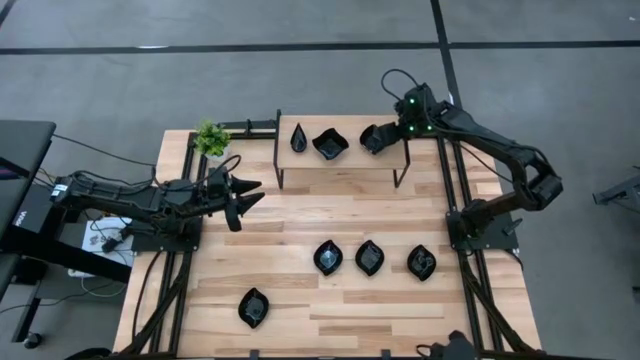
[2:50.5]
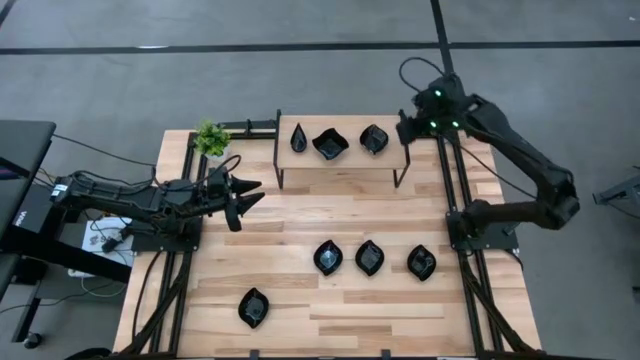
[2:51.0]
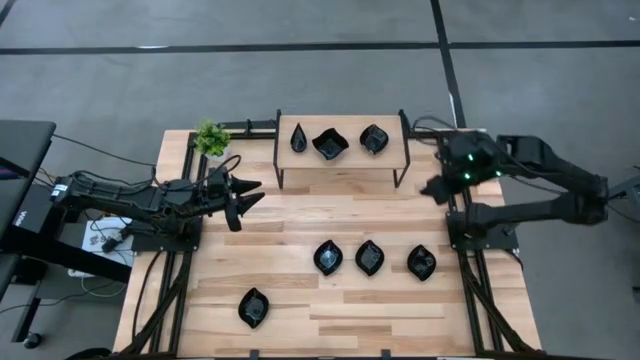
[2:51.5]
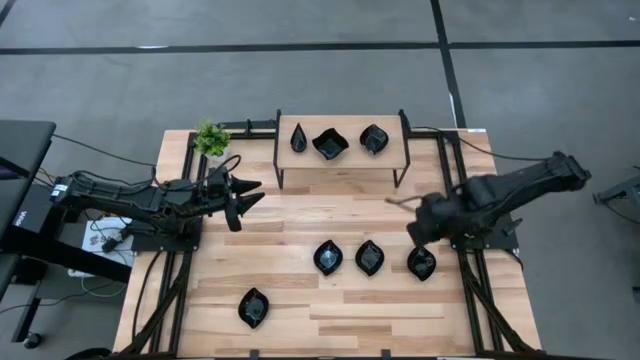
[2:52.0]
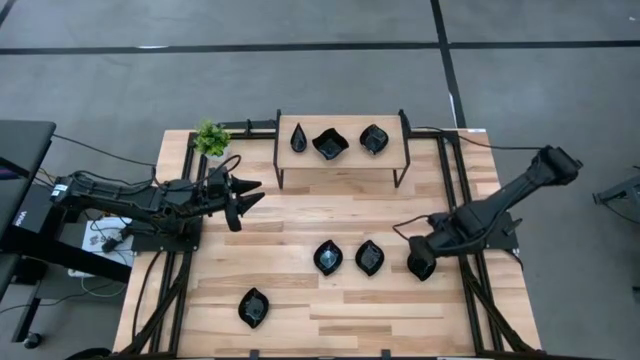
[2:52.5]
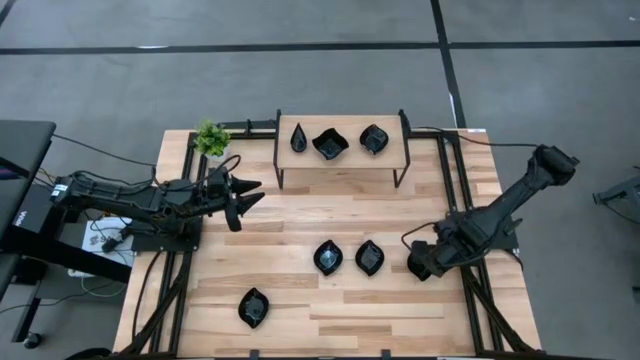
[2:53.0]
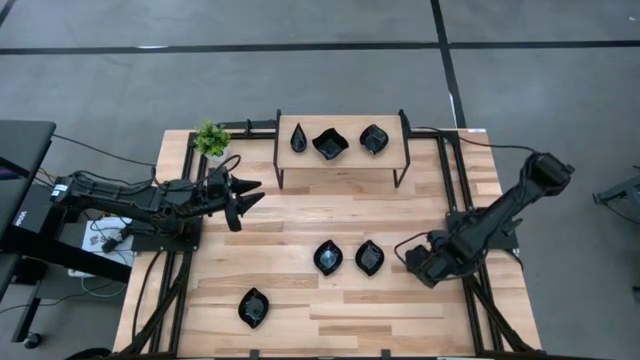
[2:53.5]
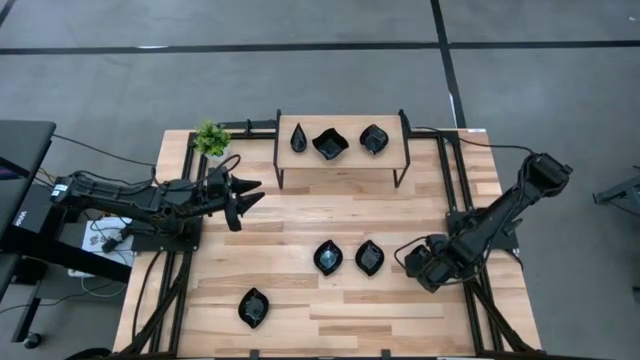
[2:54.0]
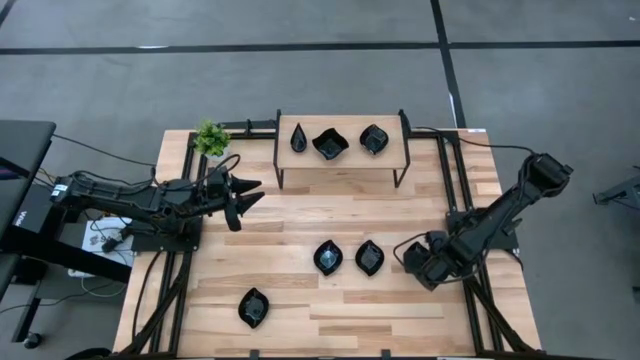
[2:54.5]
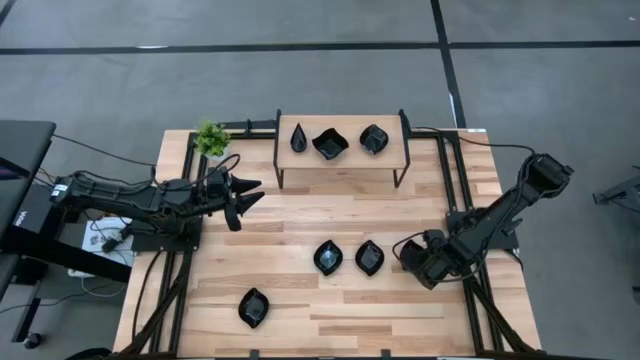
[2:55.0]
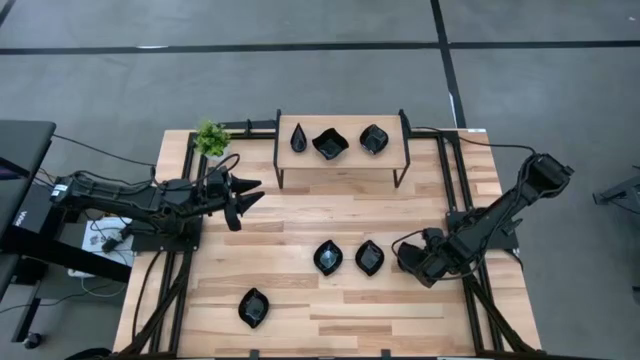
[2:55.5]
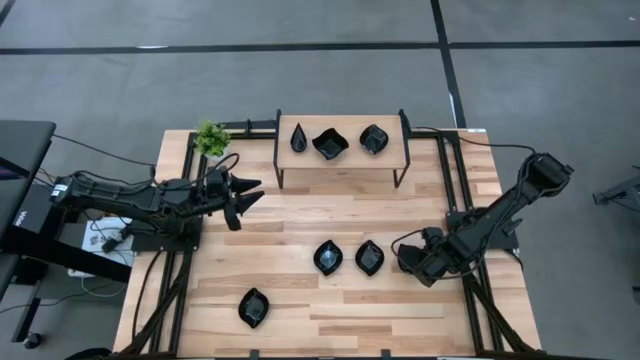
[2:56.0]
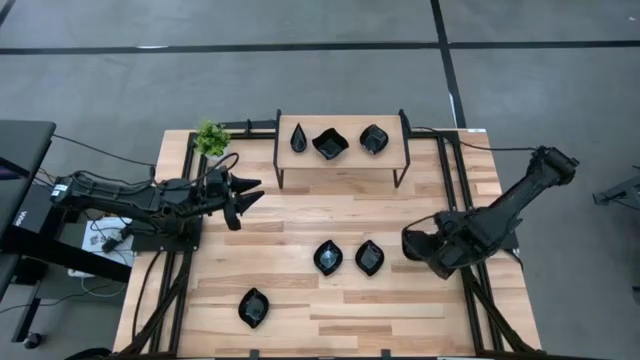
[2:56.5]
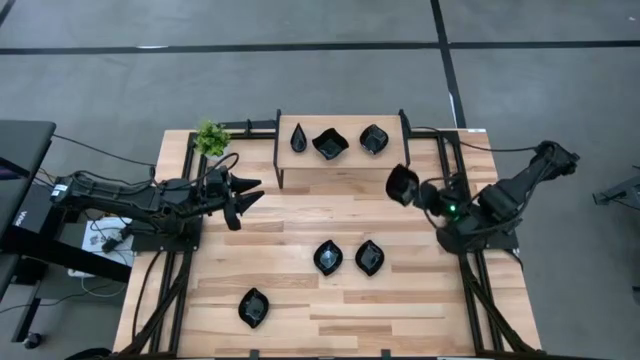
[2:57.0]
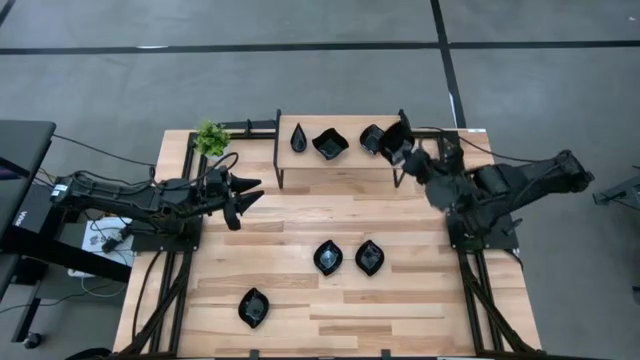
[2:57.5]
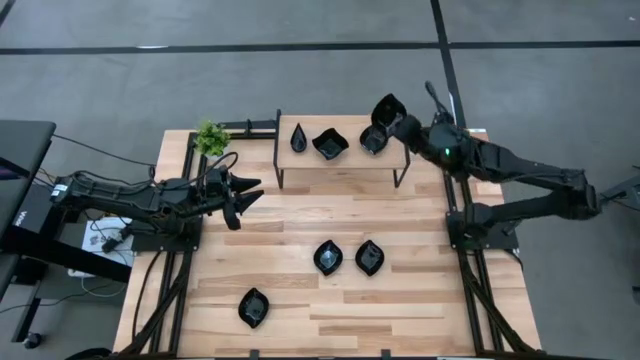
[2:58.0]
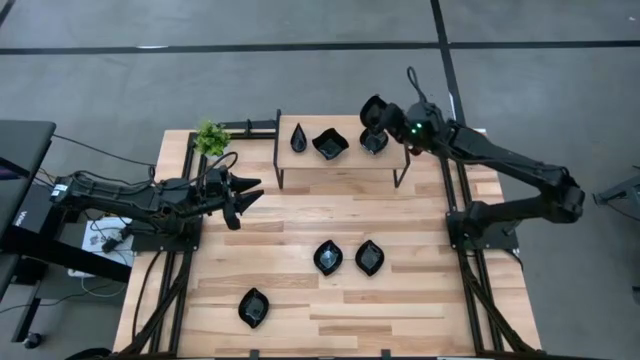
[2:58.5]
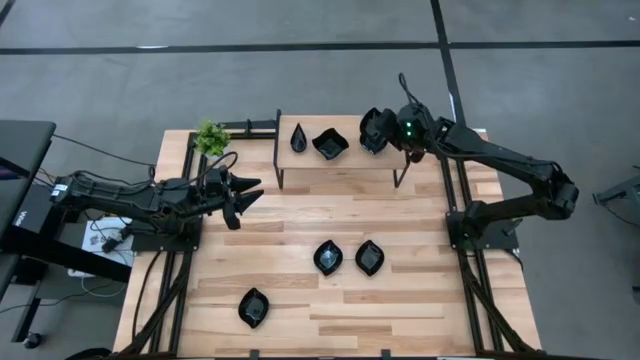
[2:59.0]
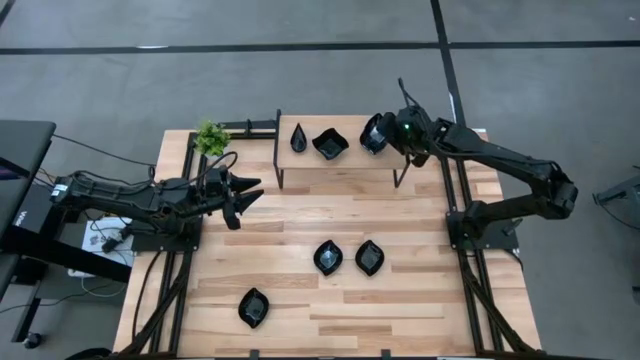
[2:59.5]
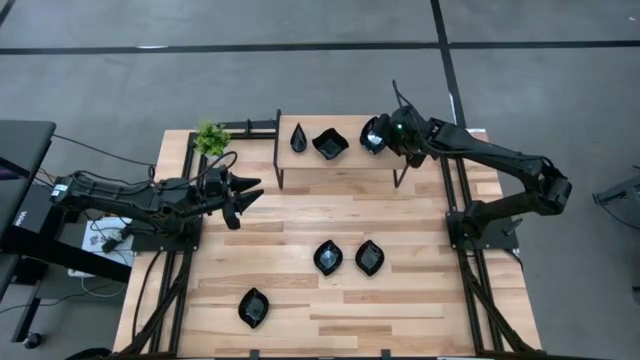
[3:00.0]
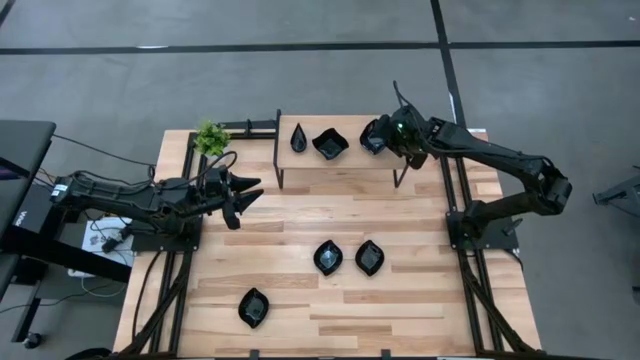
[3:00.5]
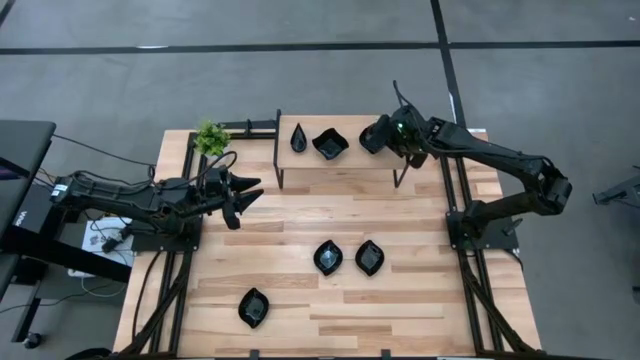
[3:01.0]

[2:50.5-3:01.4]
Task: Pick & Place Mini shaped plates
Stack the black leaf shaped plate on top of the black leaf shaped plate on the shelf

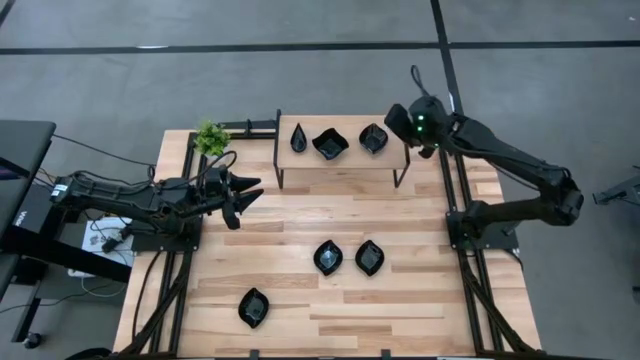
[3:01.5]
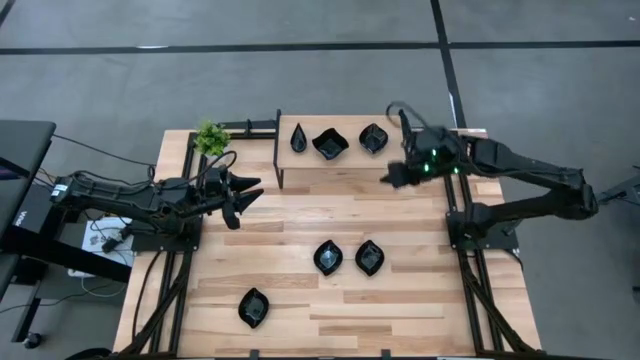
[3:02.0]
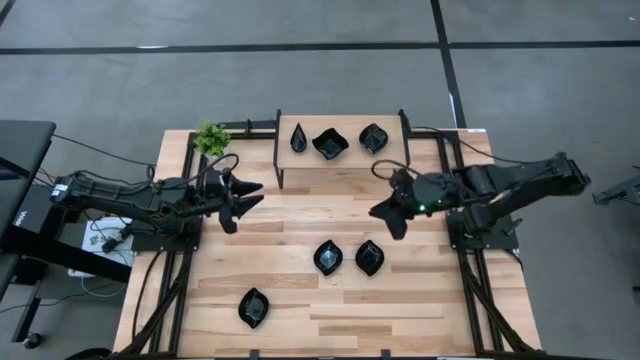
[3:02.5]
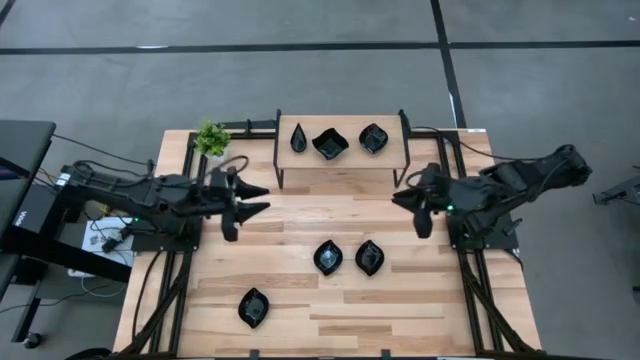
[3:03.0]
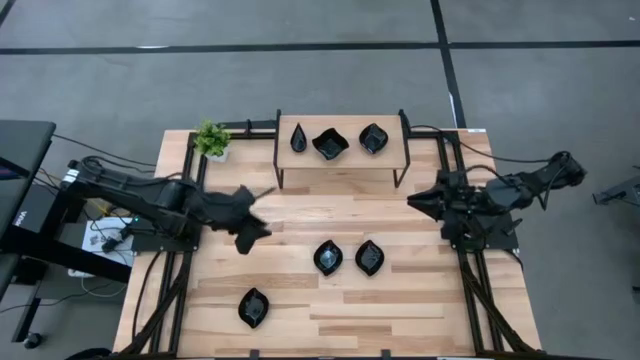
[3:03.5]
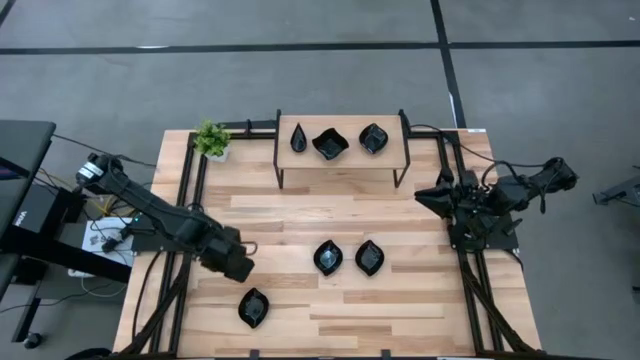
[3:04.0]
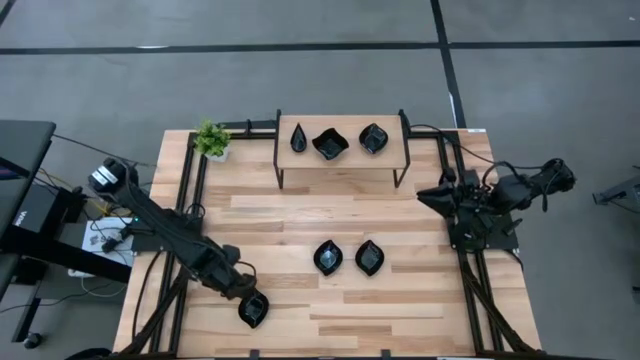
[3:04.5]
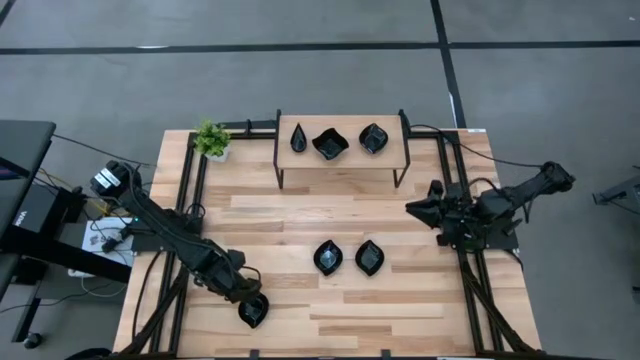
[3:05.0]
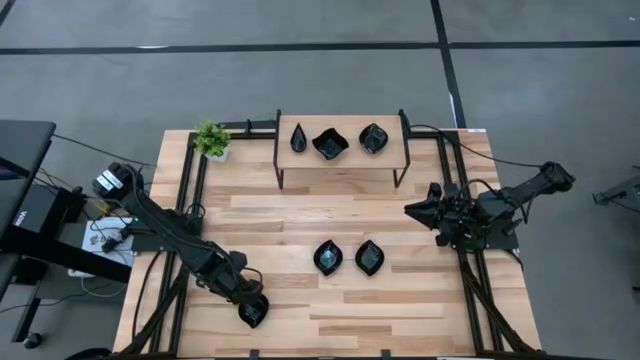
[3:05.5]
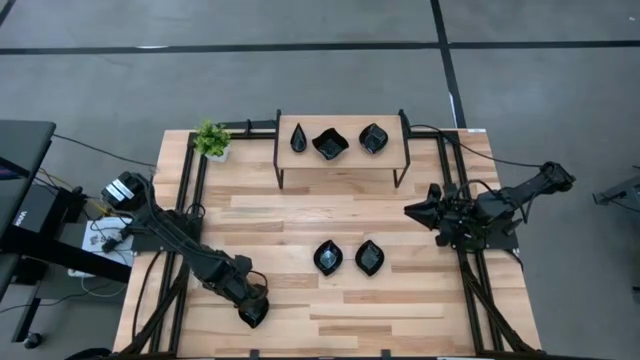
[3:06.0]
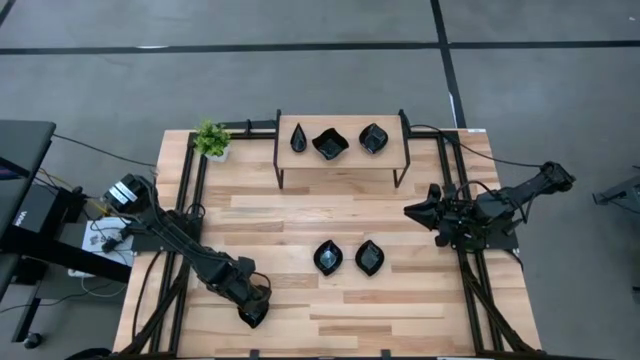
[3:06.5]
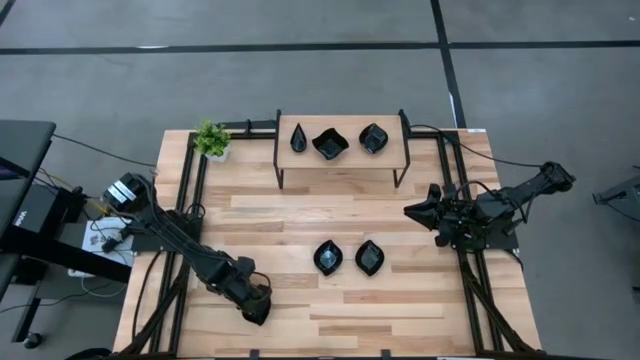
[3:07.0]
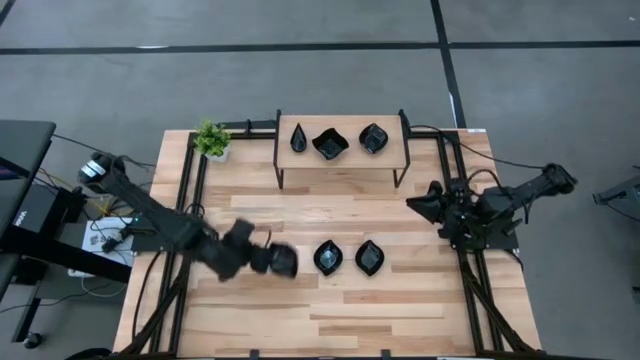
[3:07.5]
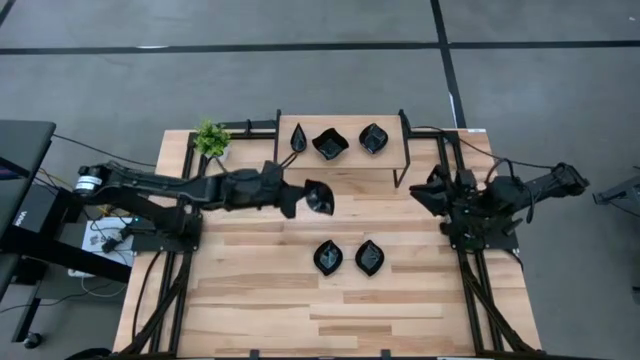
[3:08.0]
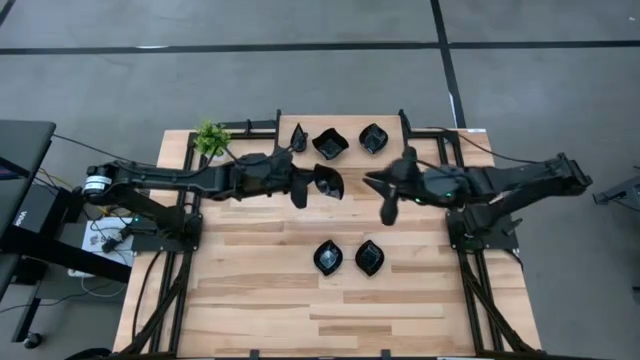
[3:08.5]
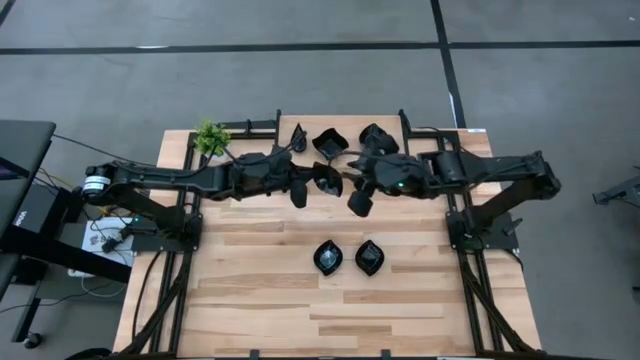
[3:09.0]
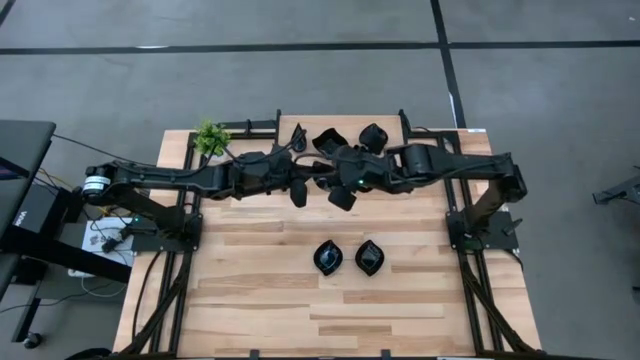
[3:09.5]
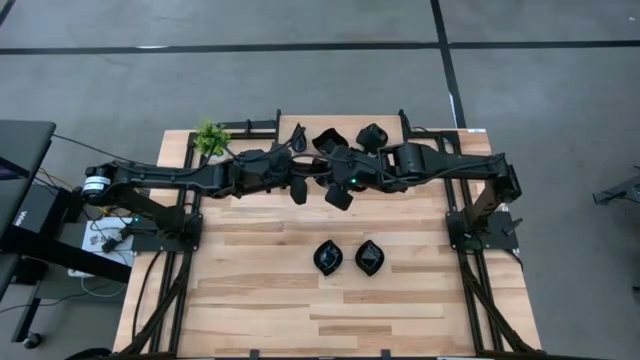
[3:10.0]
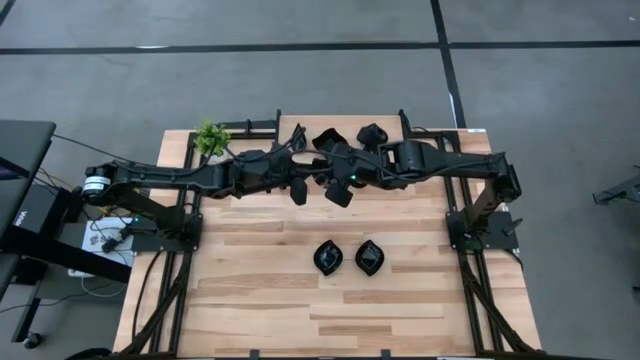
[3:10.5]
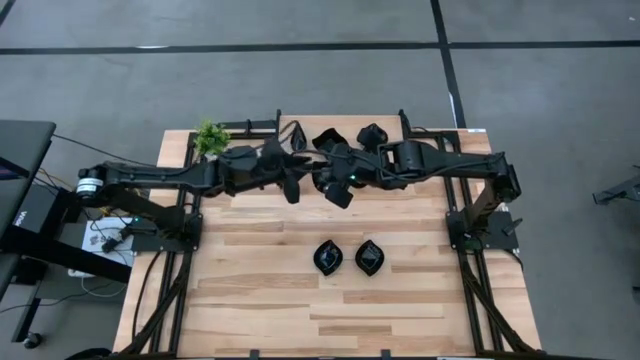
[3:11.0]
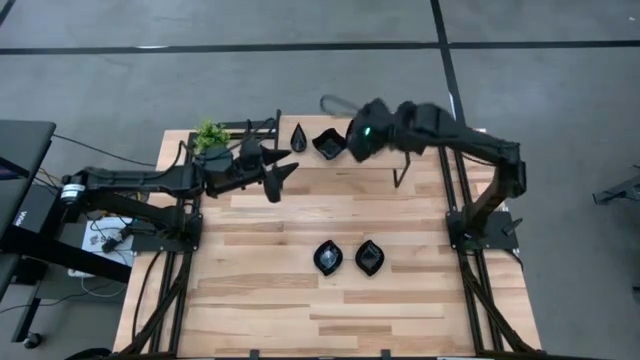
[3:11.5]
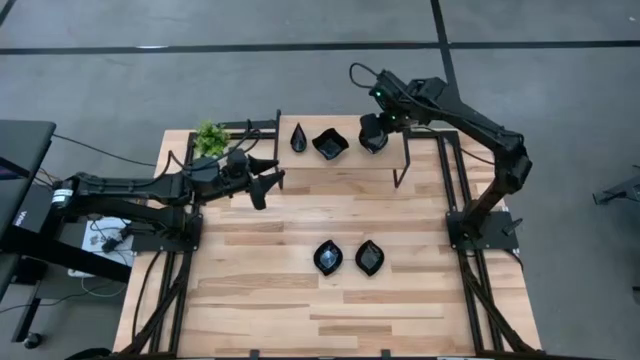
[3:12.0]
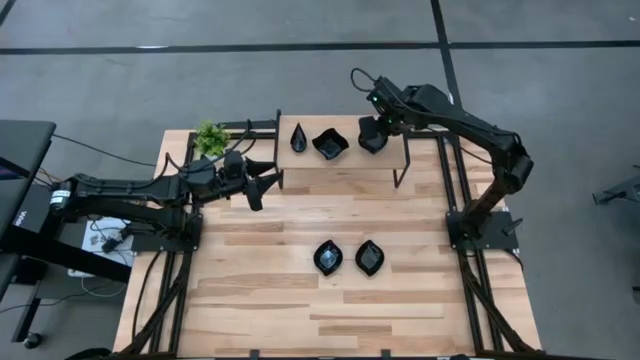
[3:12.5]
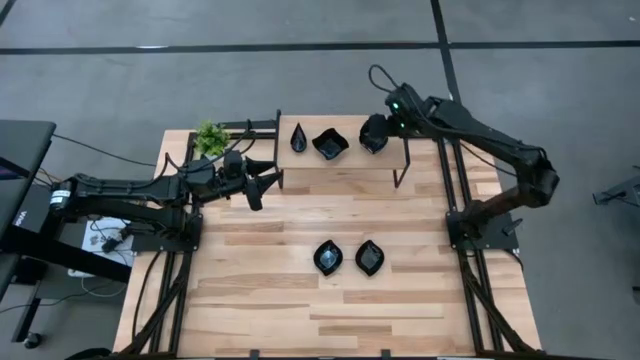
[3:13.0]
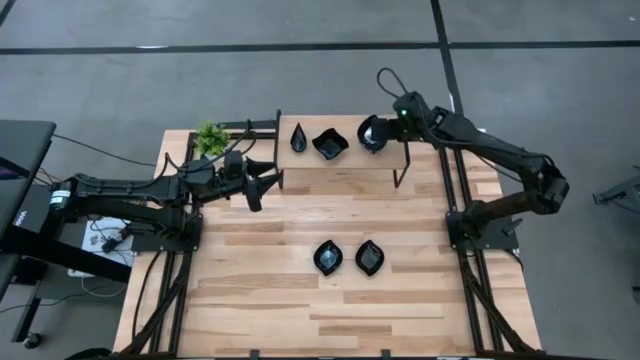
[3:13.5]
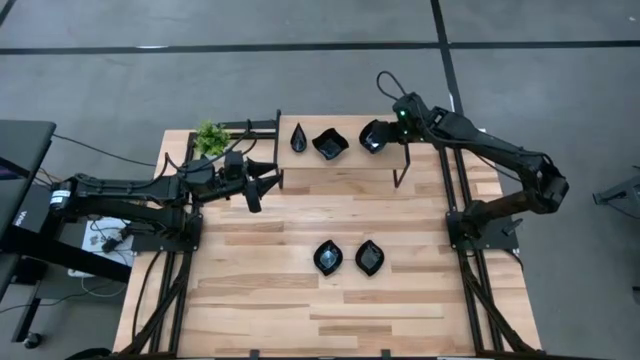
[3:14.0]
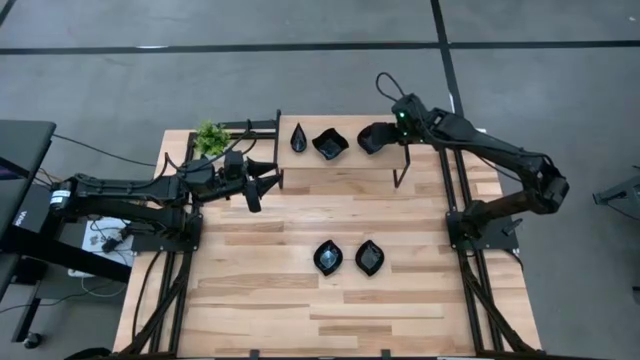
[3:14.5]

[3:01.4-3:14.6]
Stack the black leaf shaped plate on top of the black leaf shaped plates on the shelf
